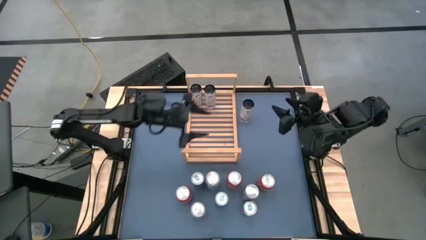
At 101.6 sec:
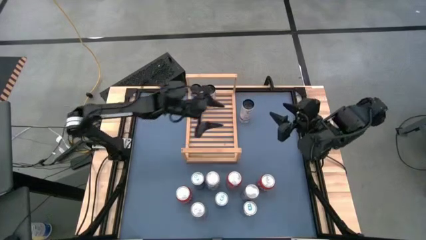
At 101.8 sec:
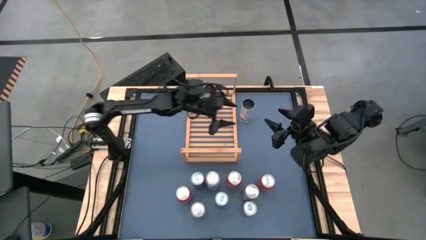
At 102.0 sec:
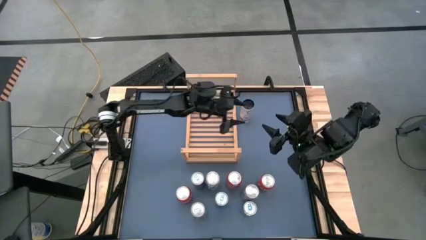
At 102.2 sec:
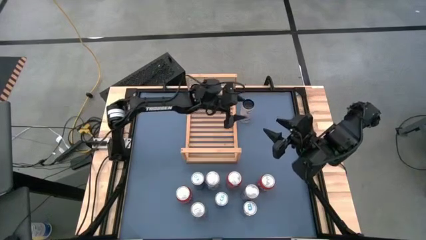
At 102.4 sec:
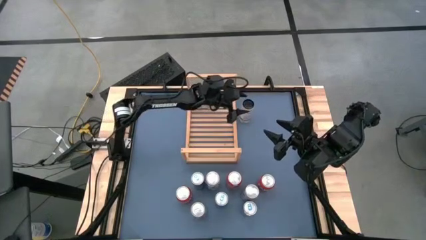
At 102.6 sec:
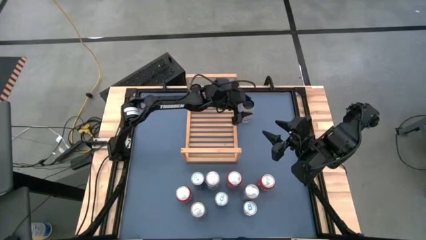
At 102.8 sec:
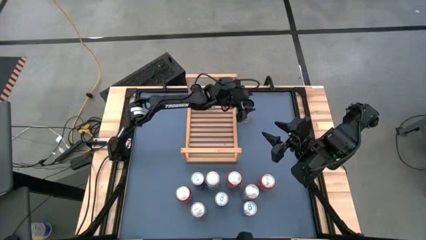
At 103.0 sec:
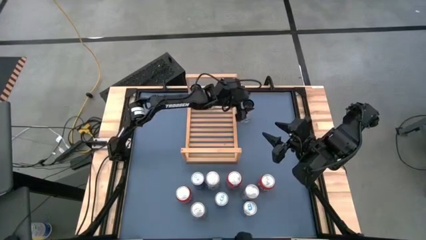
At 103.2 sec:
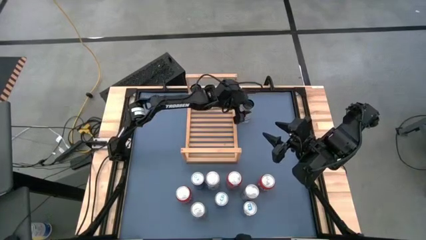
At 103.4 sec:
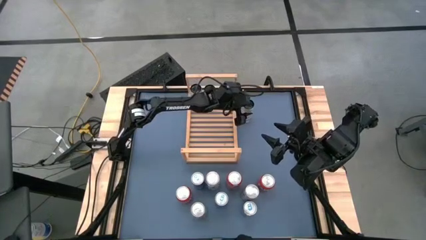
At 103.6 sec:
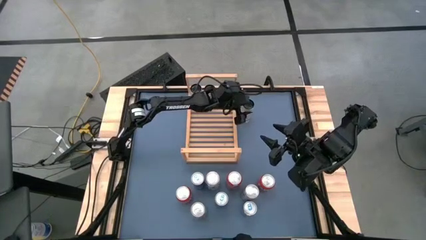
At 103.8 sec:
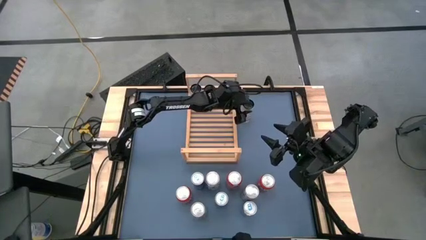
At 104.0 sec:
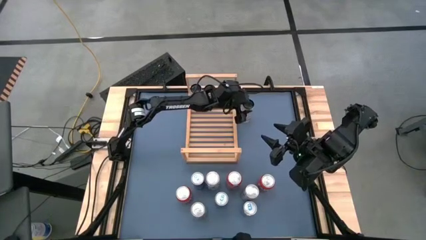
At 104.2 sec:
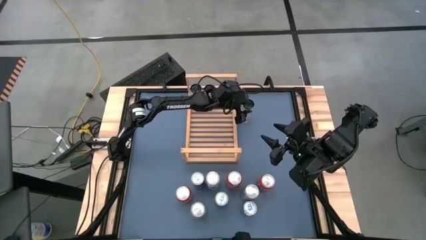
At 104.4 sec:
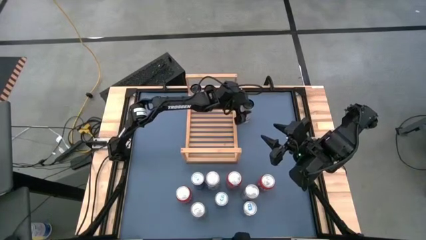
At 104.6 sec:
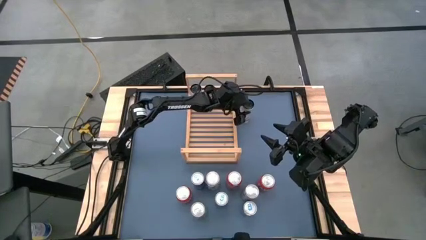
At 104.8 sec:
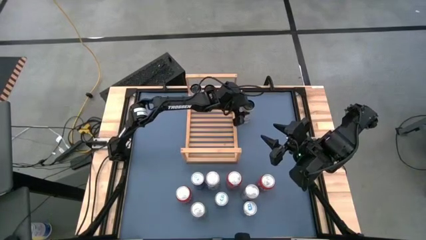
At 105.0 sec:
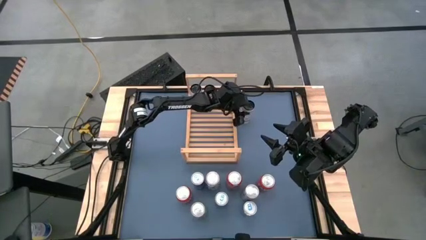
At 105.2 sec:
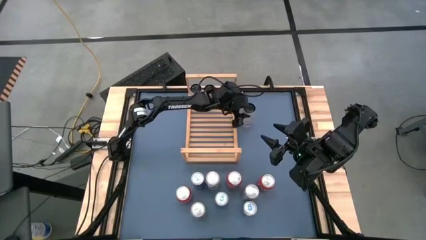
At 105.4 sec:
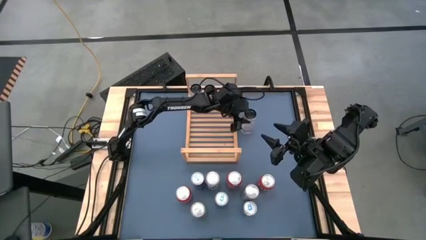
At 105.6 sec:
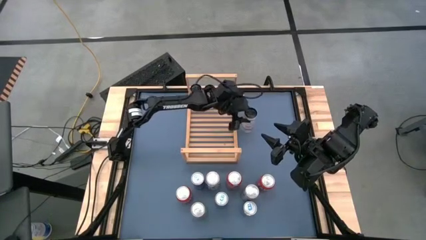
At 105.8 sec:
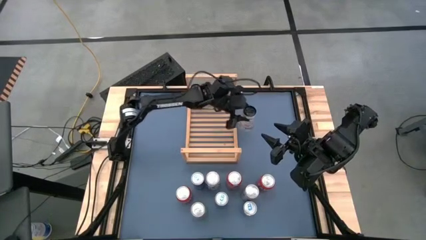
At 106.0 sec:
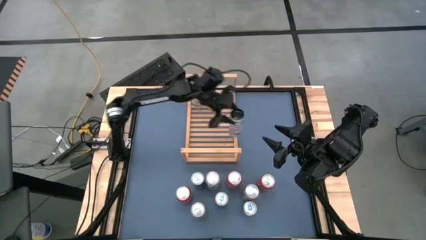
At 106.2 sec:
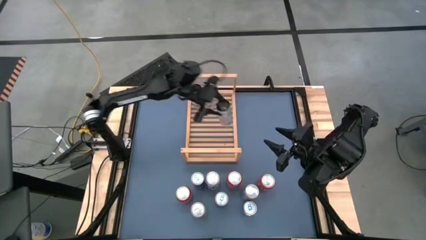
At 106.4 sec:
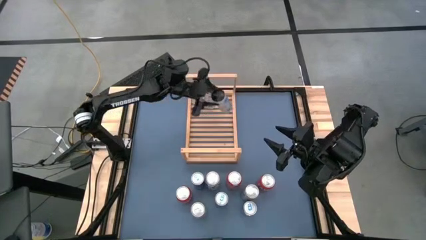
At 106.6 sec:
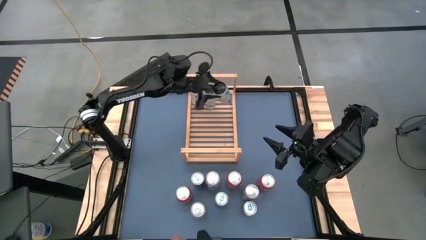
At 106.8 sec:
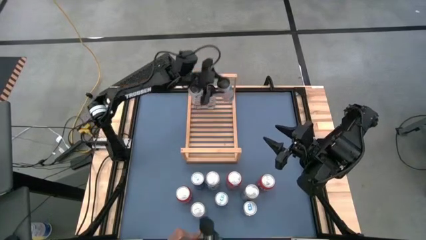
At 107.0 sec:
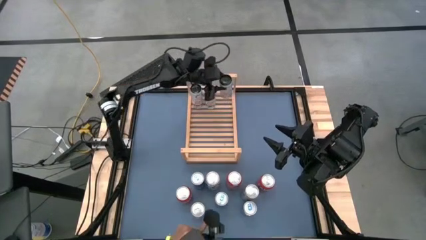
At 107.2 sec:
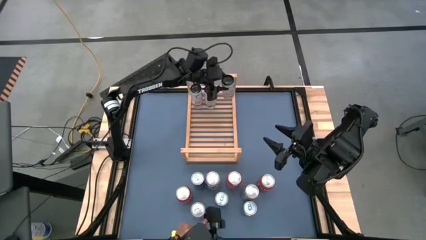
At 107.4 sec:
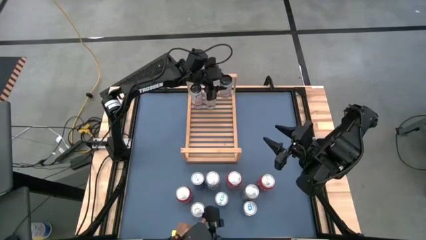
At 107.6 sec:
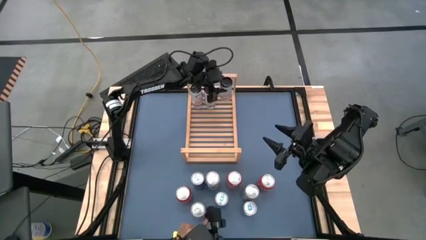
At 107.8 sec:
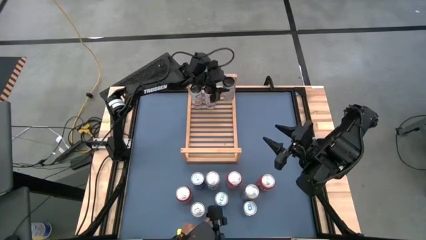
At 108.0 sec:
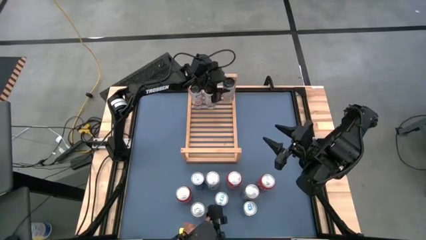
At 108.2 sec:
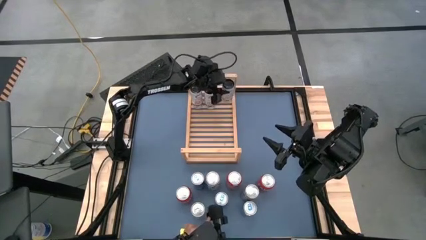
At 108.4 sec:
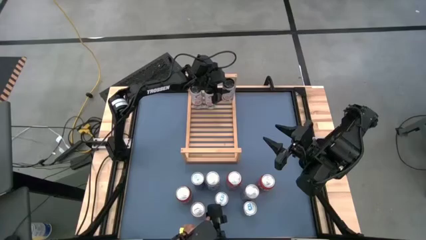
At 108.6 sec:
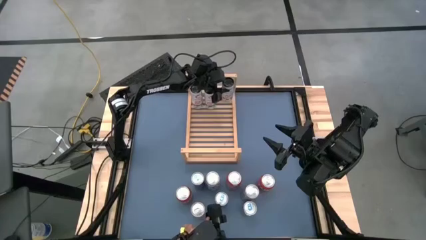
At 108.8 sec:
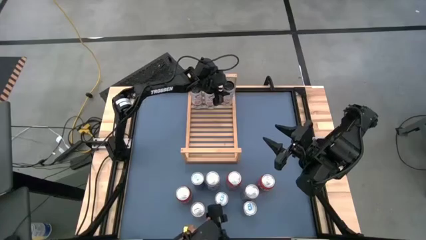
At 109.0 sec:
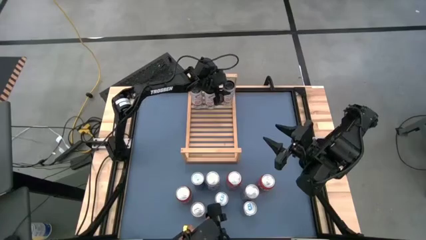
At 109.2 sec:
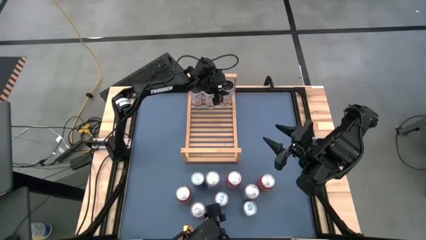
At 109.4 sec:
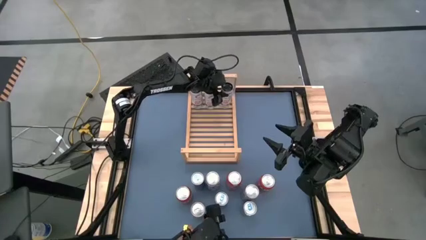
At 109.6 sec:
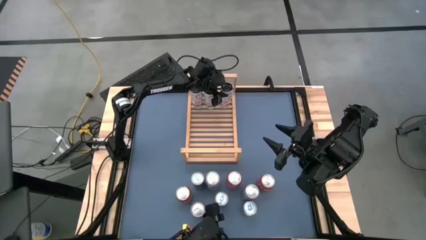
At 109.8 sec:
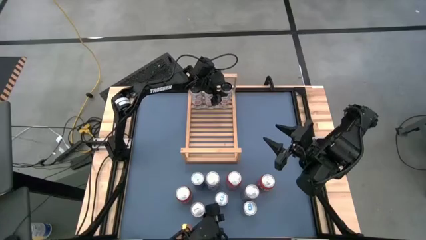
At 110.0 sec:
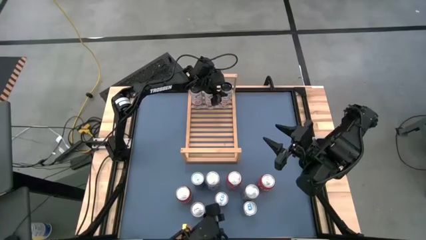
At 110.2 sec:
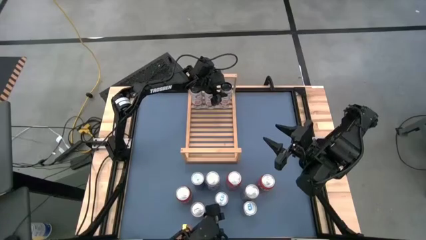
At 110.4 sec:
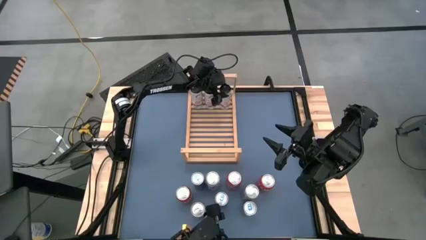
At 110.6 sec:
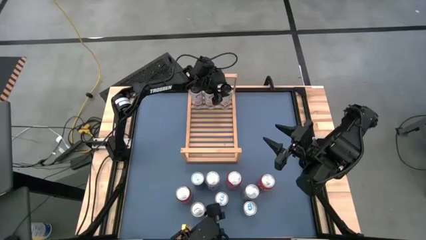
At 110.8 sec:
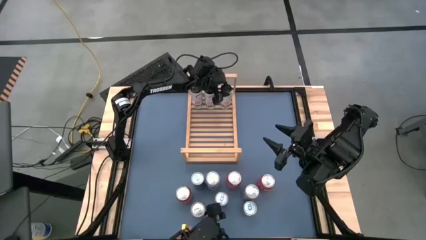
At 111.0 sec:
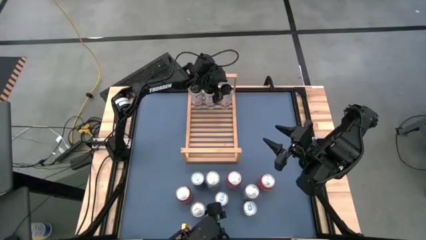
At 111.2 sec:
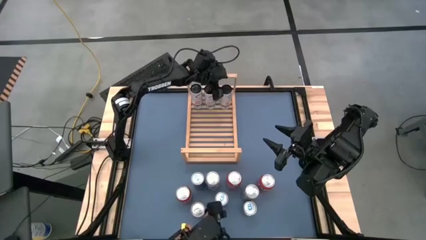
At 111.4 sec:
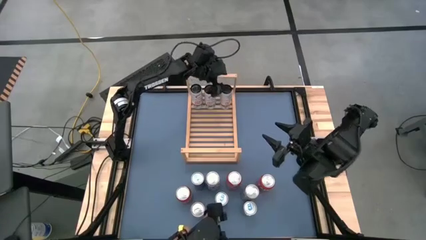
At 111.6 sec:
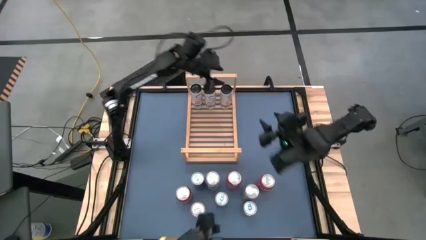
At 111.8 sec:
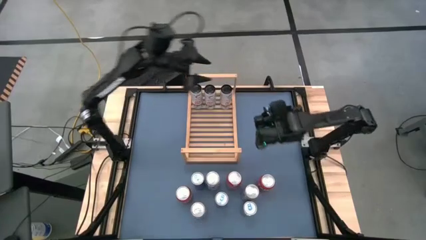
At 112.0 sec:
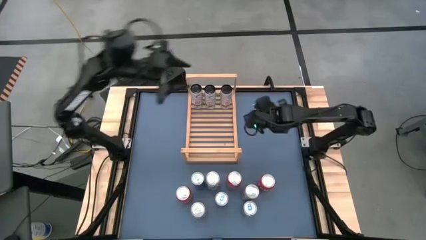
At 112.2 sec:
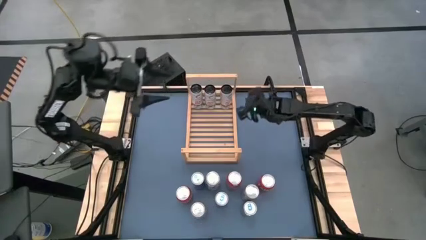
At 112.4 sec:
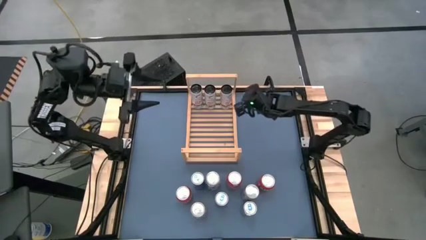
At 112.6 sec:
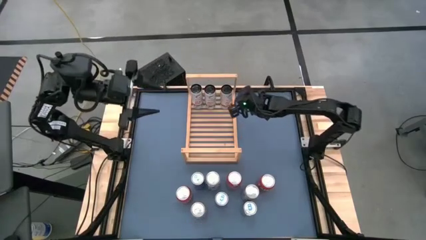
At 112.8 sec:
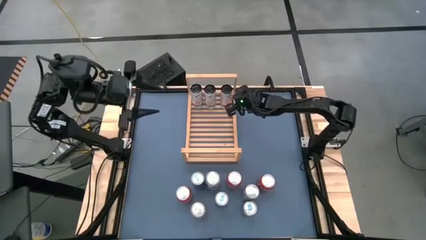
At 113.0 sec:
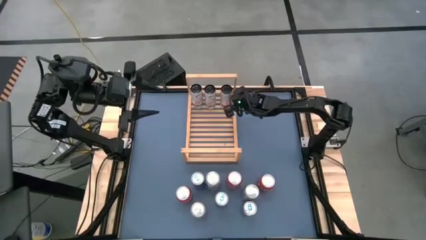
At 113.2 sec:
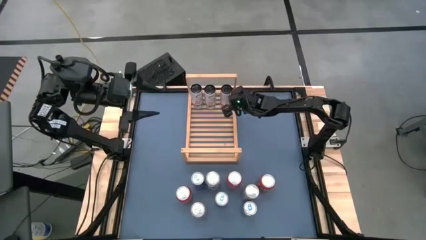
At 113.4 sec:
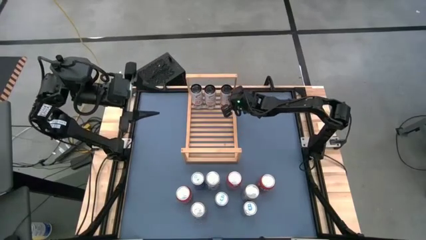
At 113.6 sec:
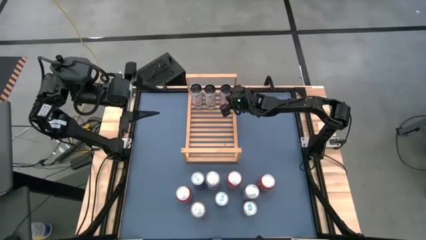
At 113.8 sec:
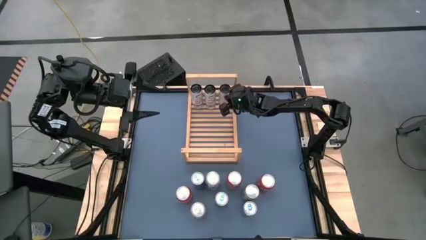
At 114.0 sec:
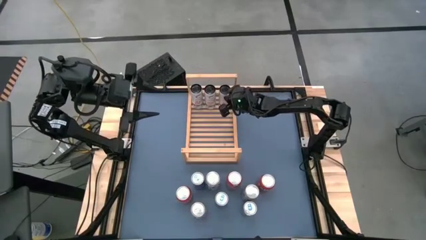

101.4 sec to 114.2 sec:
Task: Place canned beverage on shelf
Put the white soda can on the shelf aligned with the other white soda cans

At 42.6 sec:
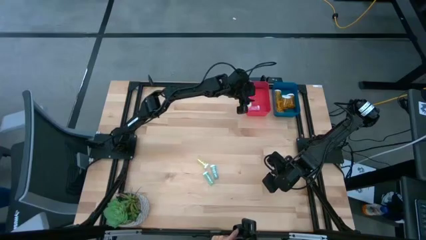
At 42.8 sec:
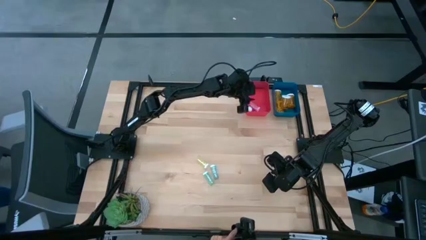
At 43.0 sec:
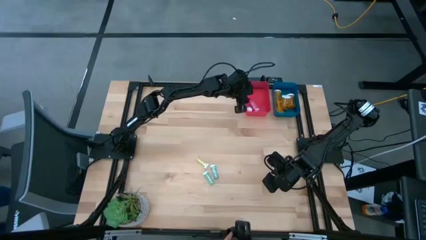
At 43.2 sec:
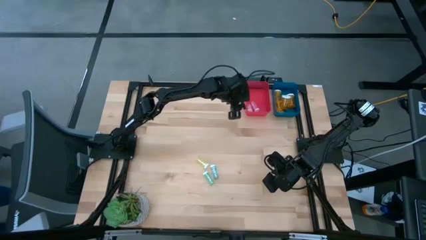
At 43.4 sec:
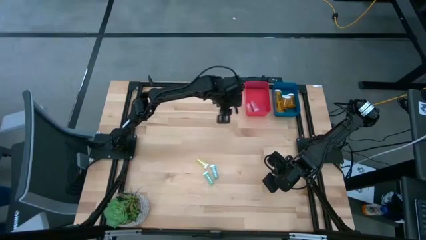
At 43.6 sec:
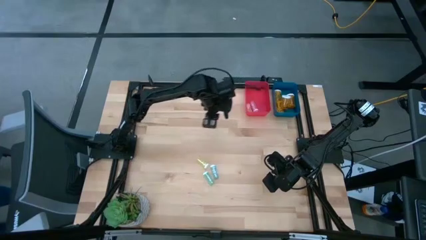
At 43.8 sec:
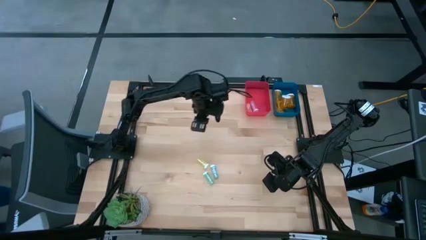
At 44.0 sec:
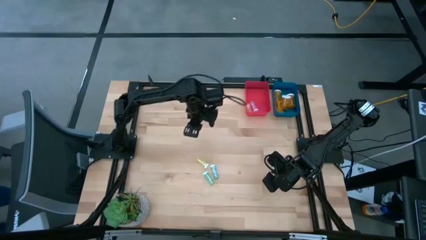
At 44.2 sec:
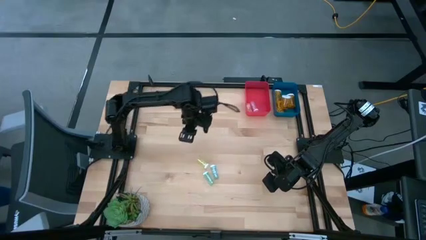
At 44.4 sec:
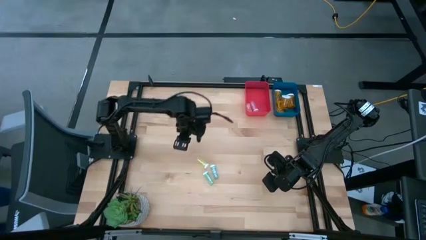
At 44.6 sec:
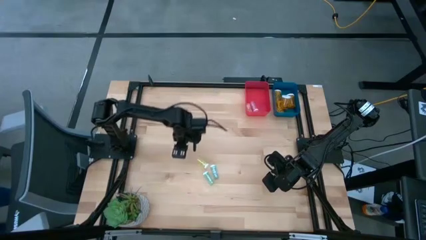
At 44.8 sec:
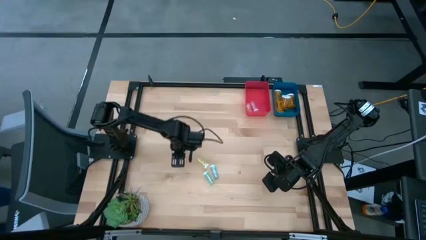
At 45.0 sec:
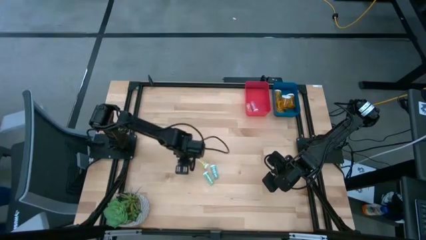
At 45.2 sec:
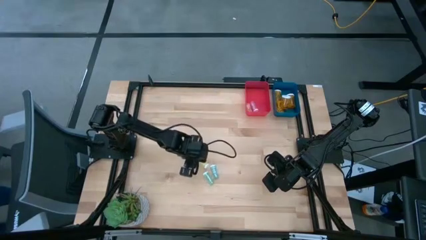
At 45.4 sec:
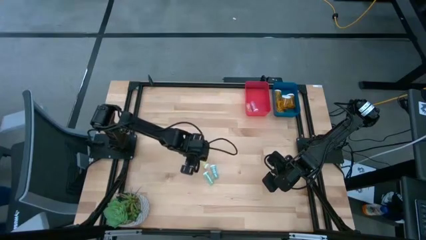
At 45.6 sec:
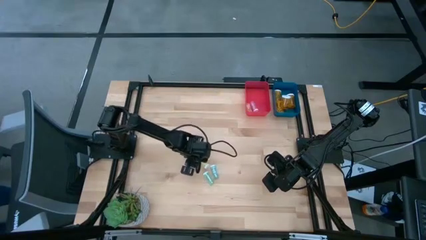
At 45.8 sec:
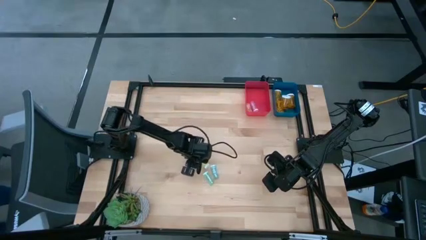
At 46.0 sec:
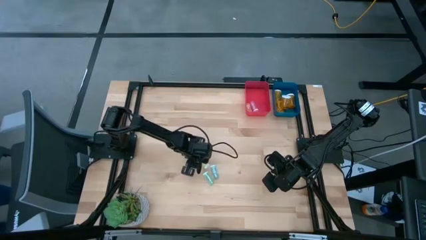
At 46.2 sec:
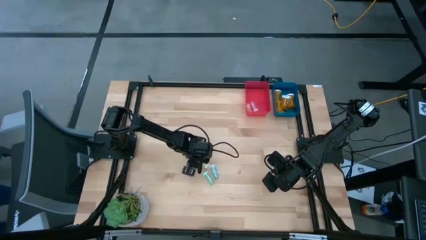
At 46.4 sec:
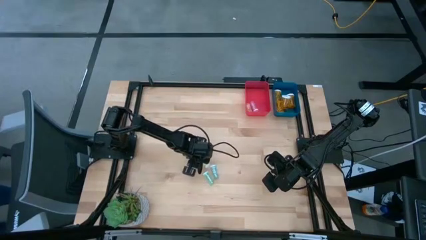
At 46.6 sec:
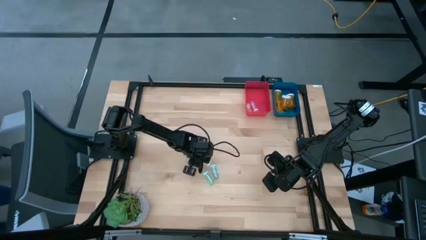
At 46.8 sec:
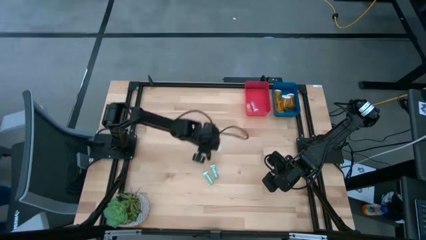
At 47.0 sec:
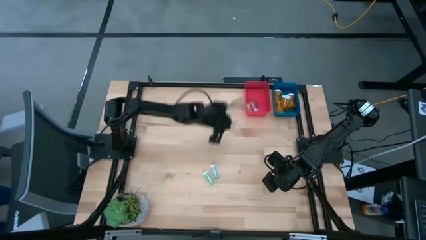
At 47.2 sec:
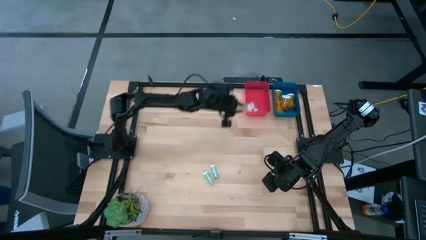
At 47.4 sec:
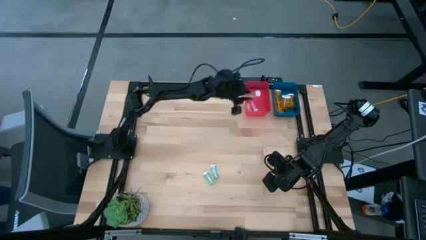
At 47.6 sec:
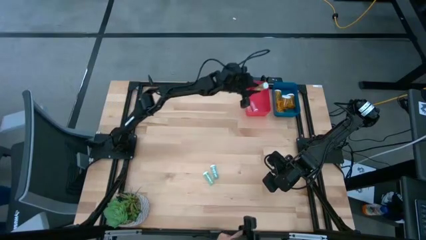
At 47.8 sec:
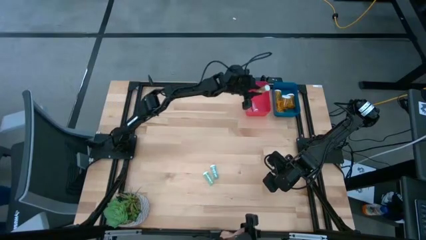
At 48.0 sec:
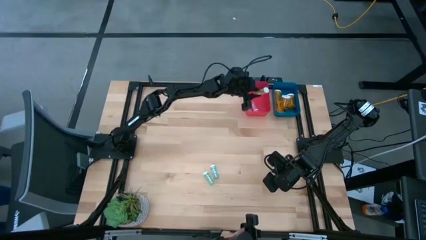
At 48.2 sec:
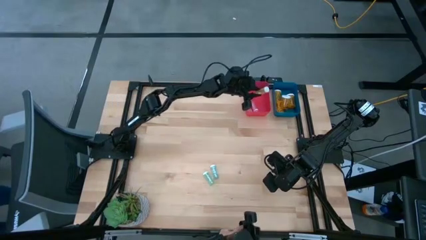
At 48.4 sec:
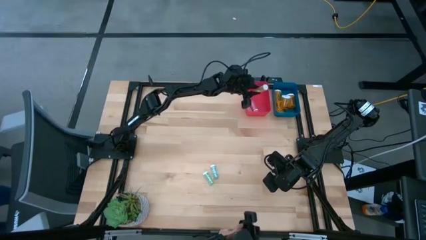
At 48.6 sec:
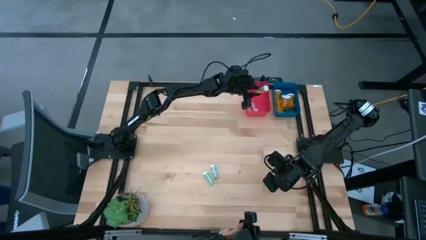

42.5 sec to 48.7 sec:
Task: Pick and place medicine bottles into bin by pill shape (circle, oval)
Put the yellow tablet bottle into the red bin
